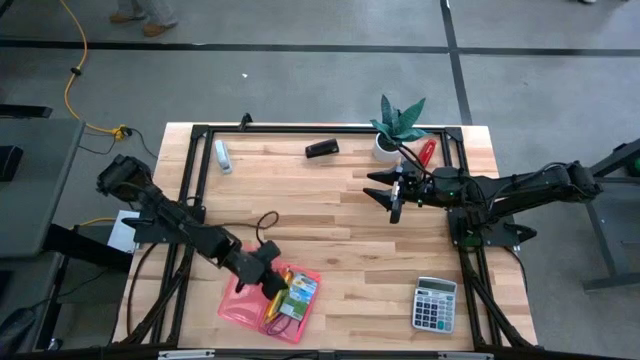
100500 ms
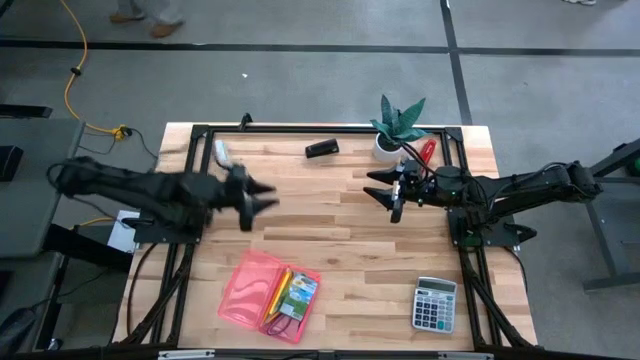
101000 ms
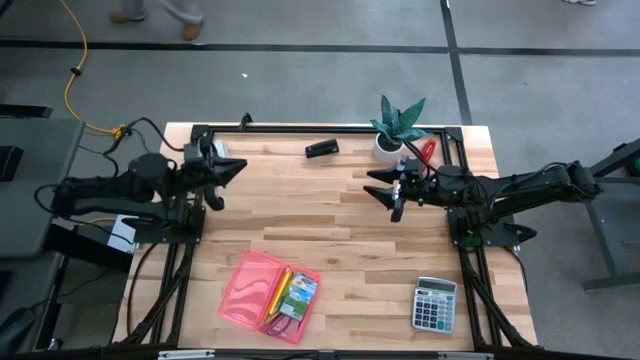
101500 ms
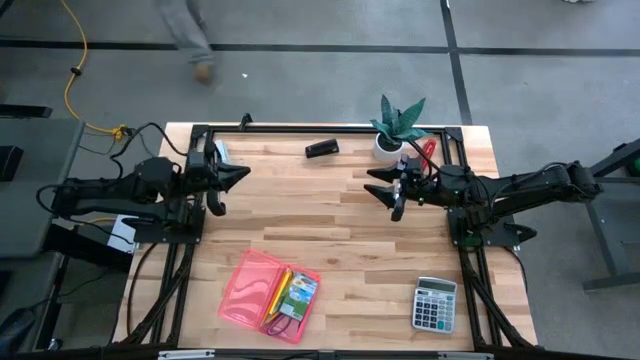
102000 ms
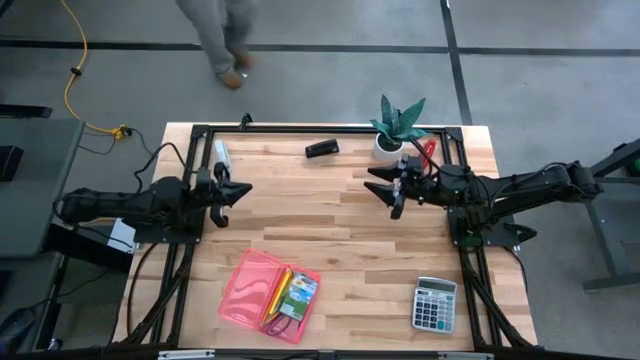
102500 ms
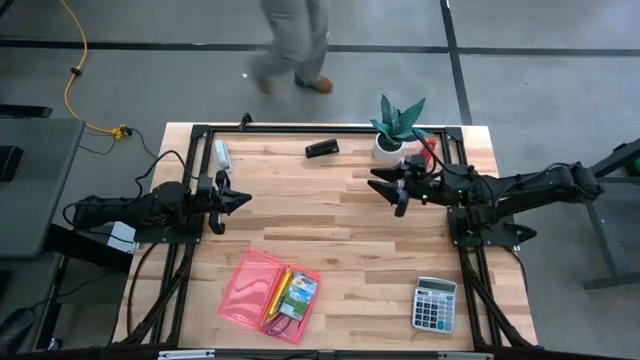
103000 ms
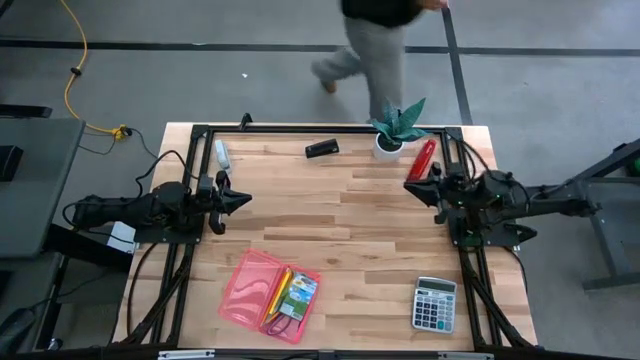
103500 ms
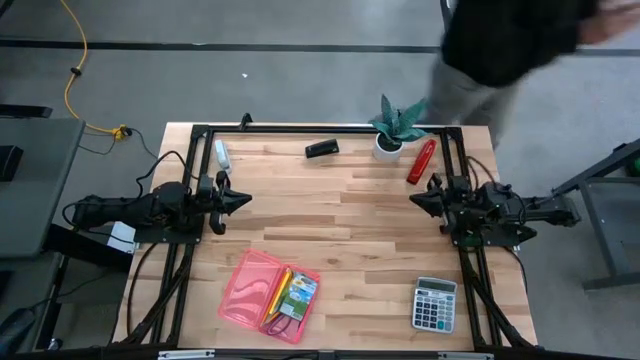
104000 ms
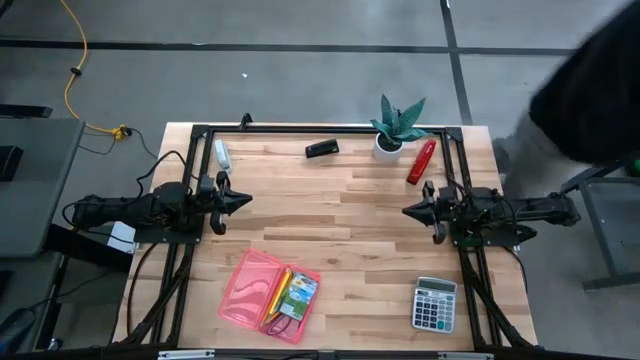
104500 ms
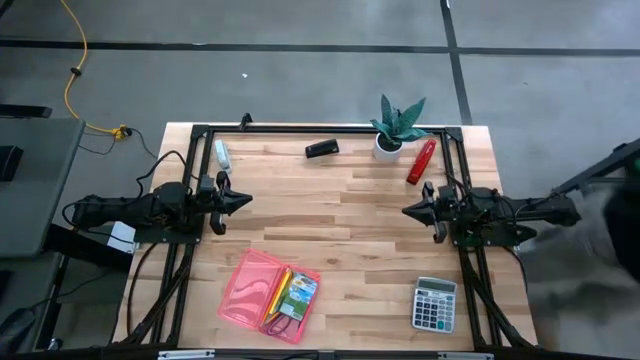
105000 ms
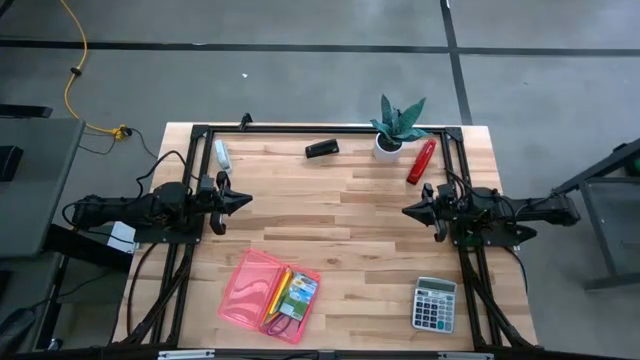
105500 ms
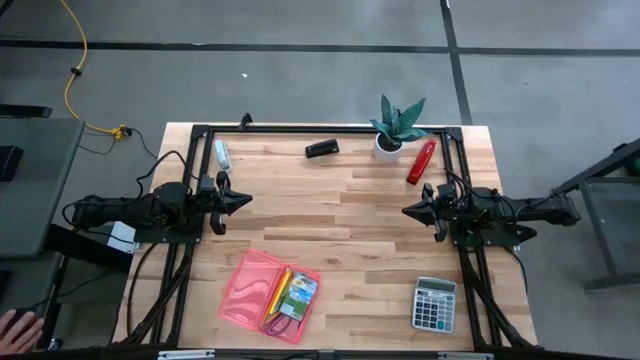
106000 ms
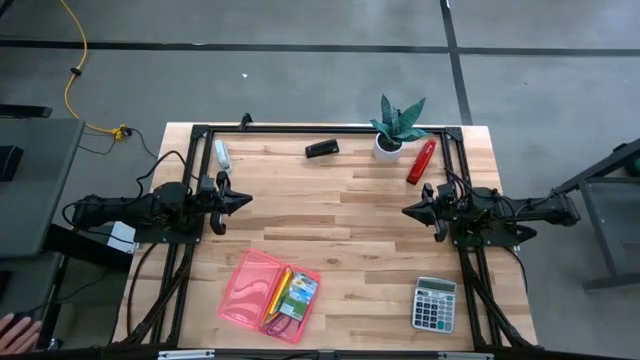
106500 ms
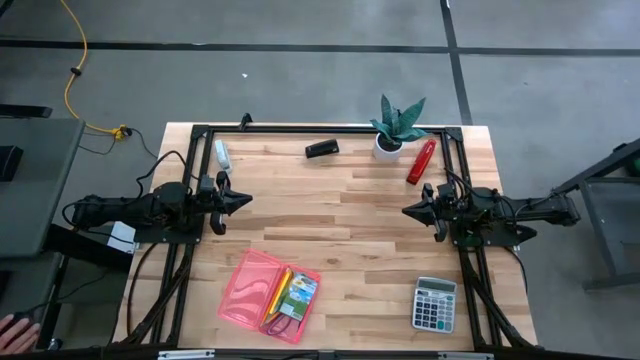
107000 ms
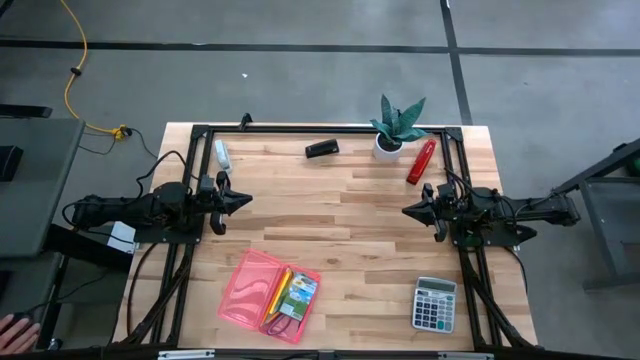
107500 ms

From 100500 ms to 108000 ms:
Task: Pack school essentials
Return to Home Position

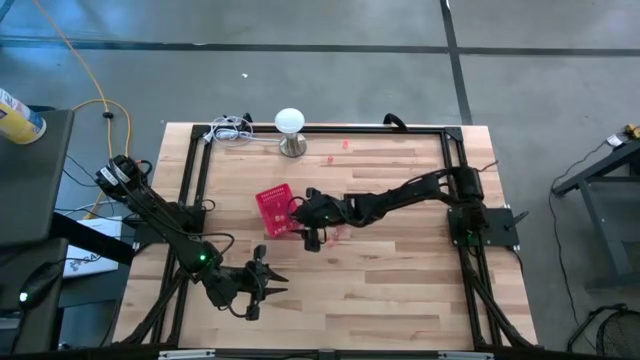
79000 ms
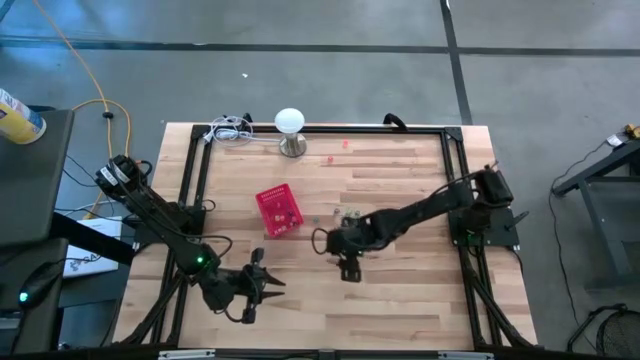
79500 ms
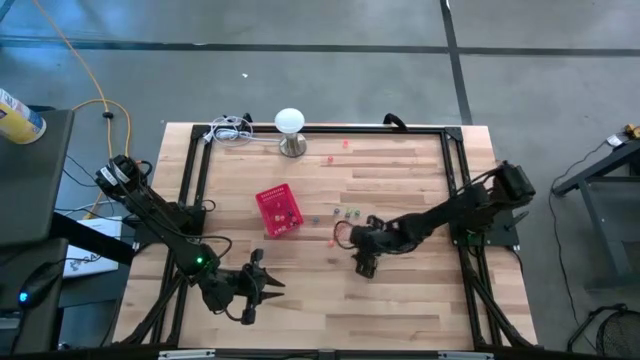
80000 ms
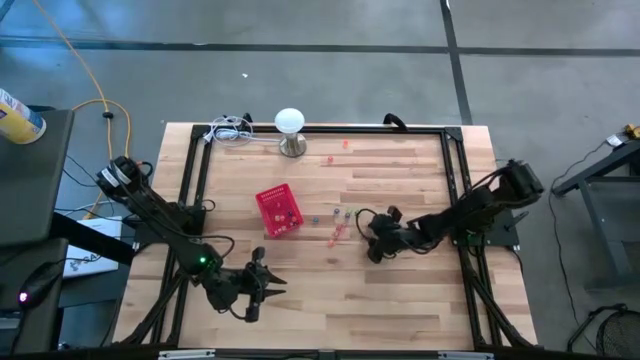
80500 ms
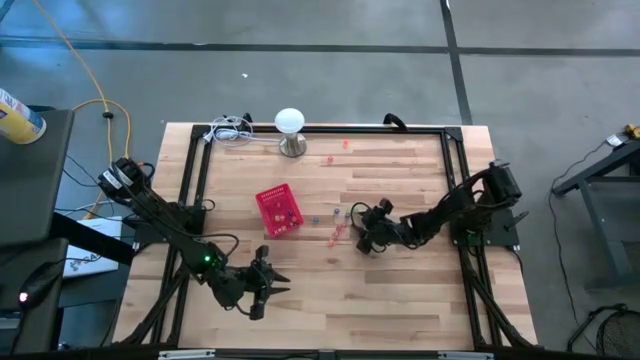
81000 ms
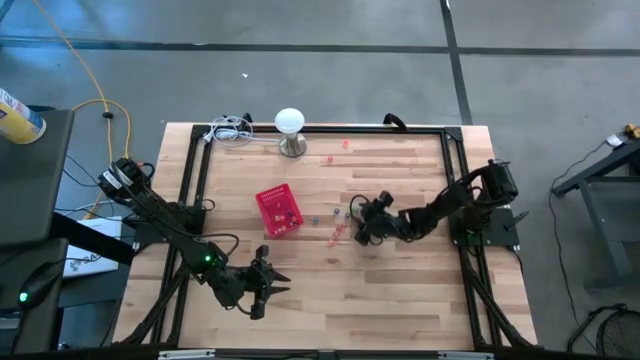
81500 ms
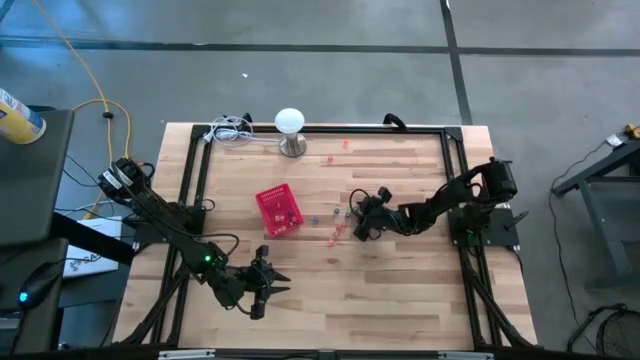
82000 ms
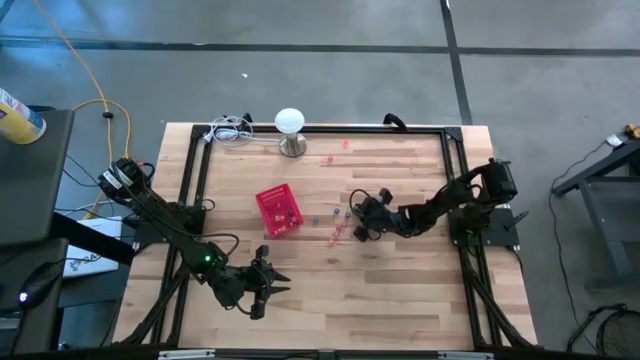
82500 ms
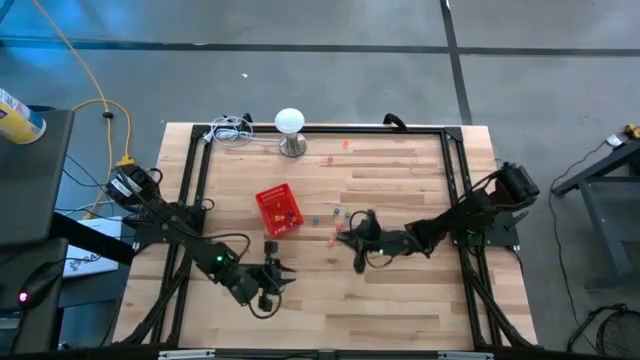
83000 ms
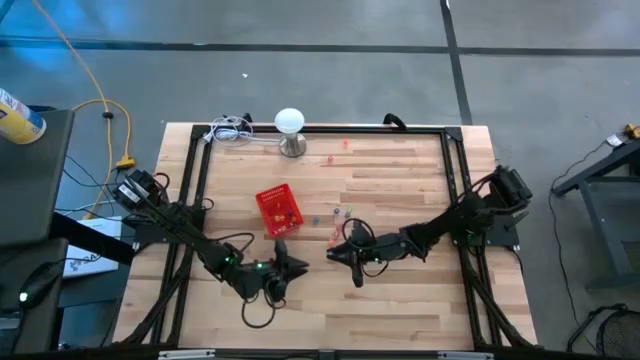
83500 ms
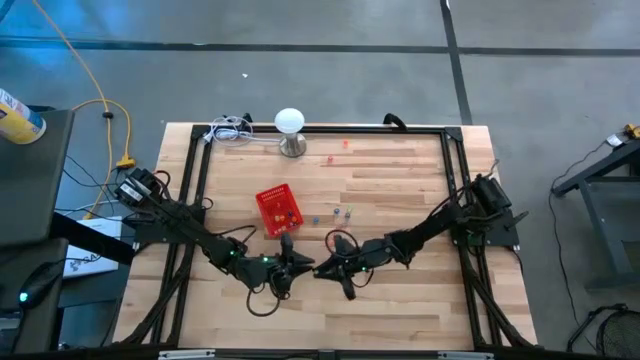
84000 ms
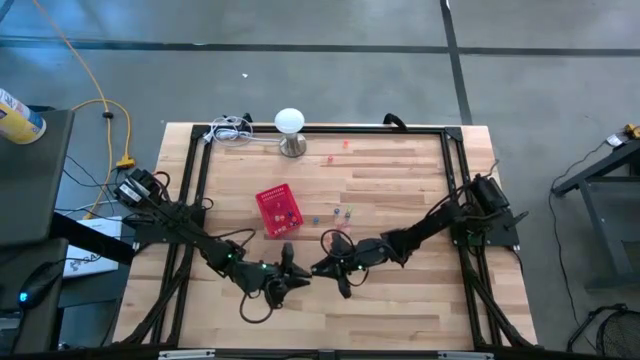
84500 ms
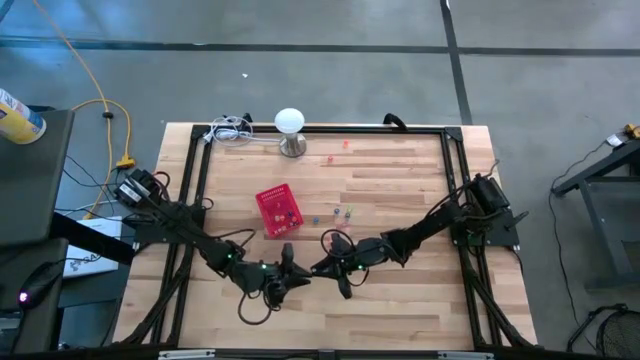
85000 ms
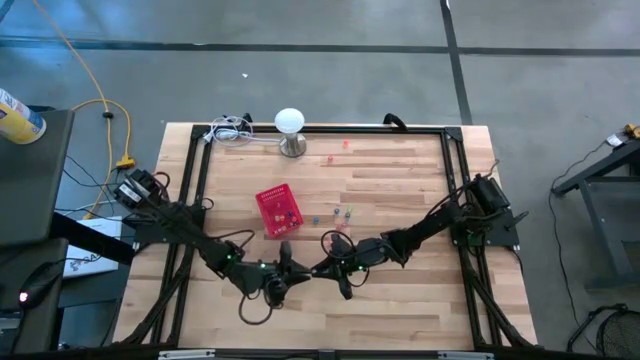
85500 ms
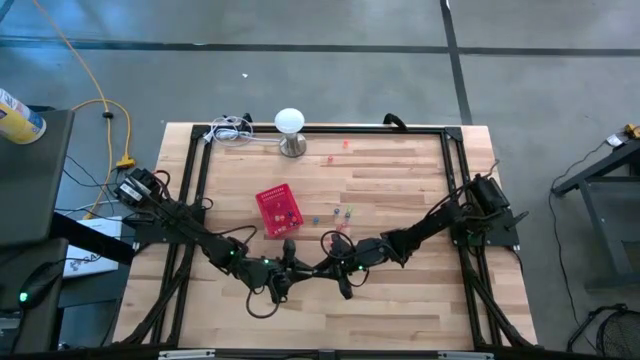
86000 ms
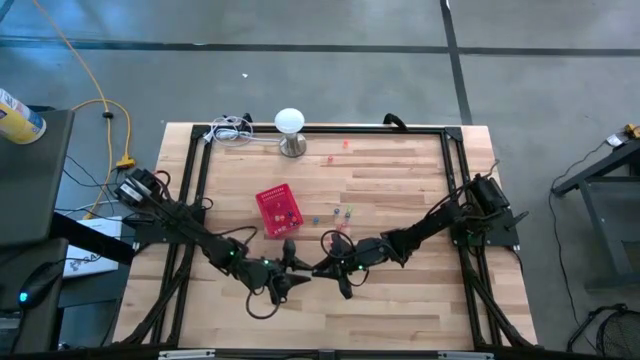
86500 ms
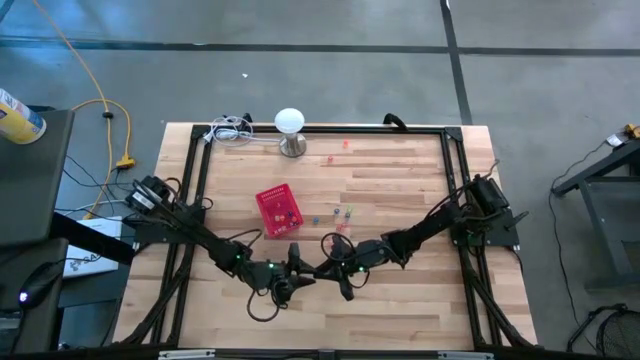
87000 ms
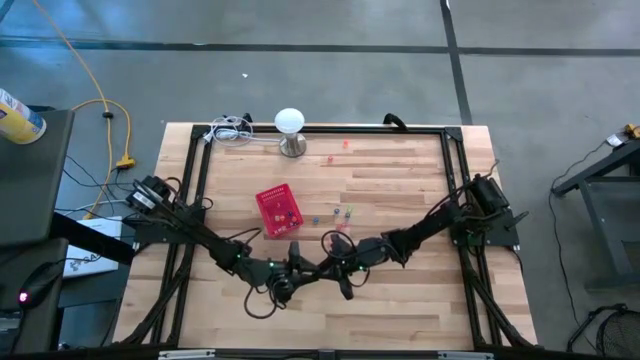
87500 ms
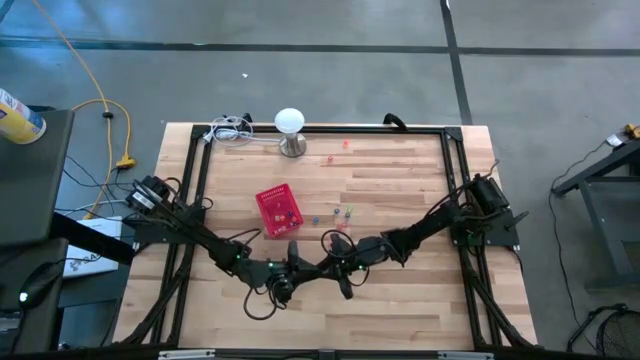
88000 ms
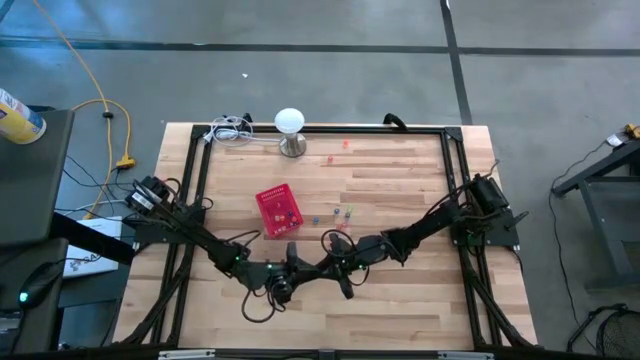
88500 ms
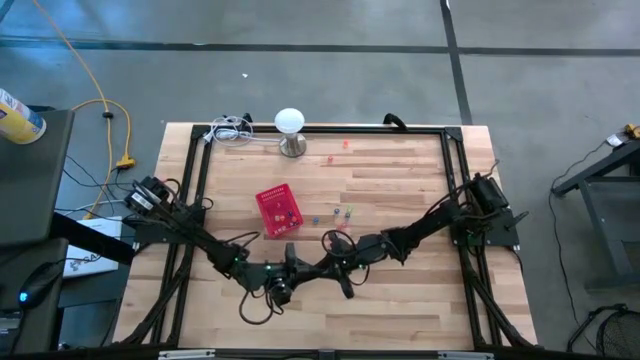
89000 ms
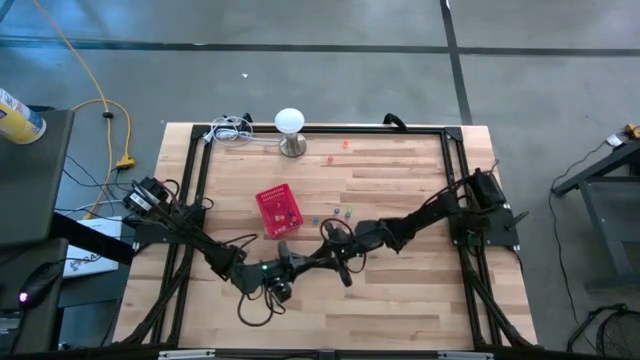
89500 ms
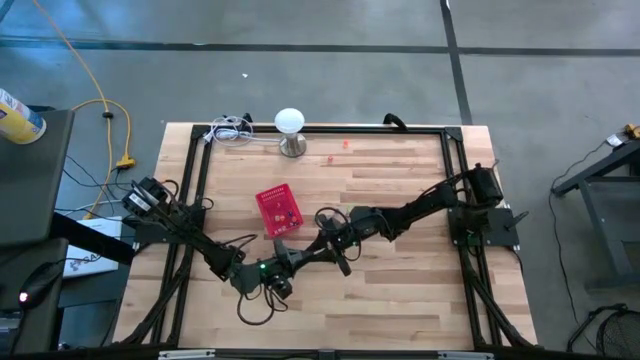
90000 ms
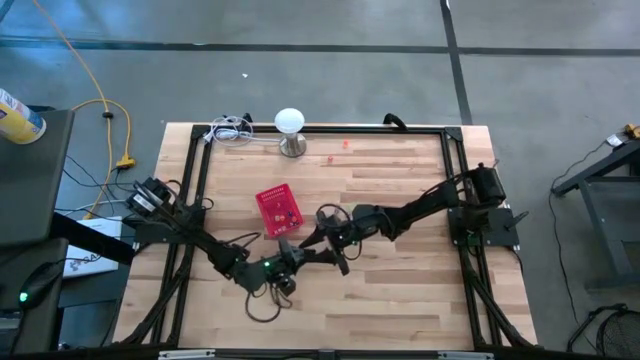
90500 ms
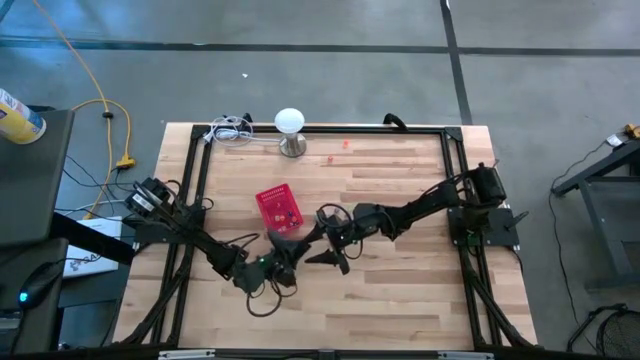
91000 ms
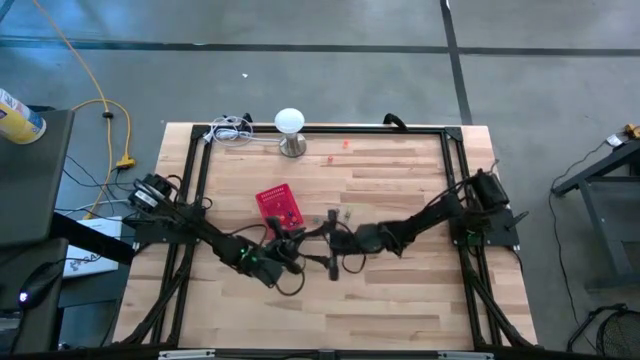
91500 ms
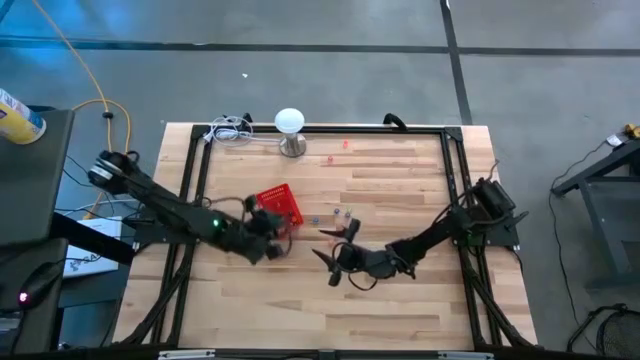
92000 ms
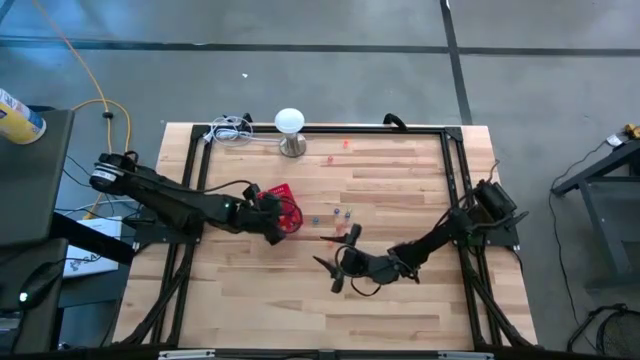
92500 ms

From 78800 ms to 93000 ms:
Task: Pick & Place Dice
Put the green die into the red basket
